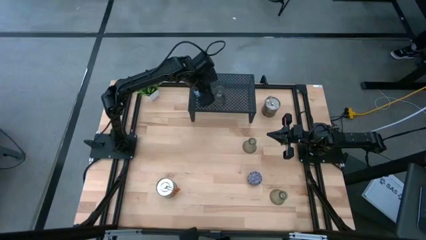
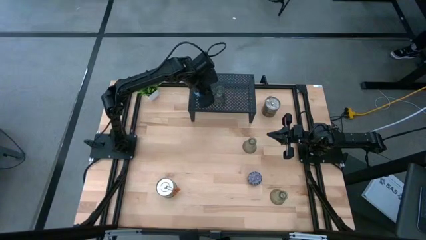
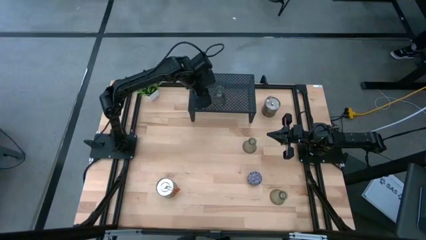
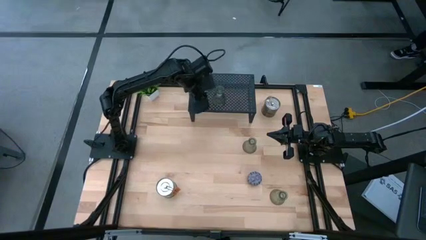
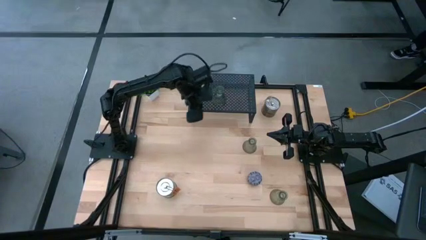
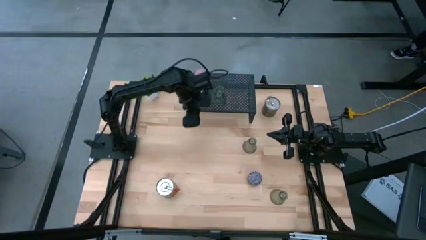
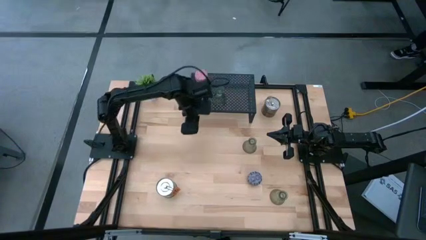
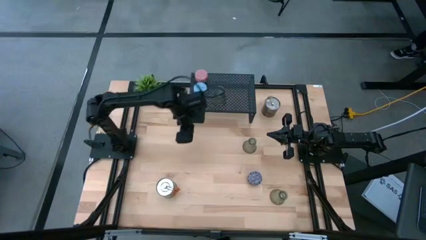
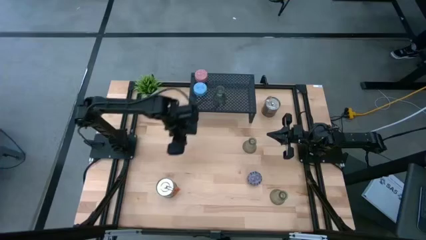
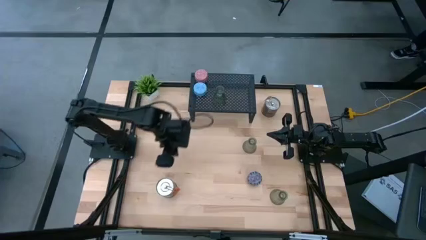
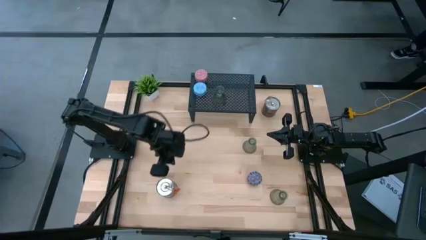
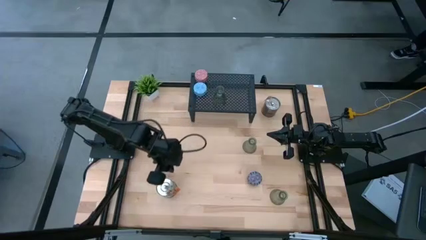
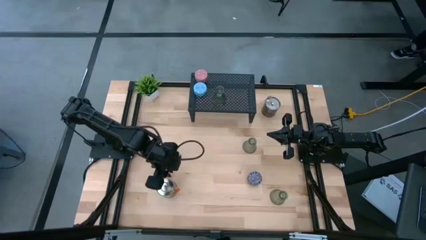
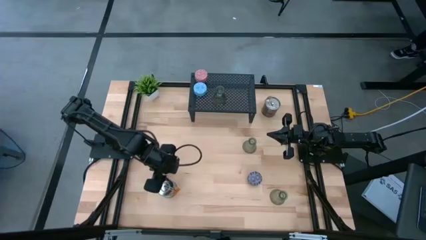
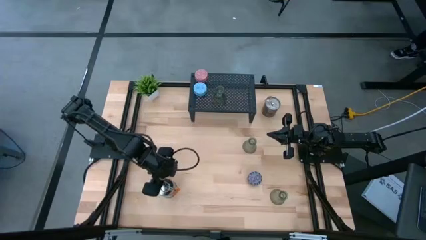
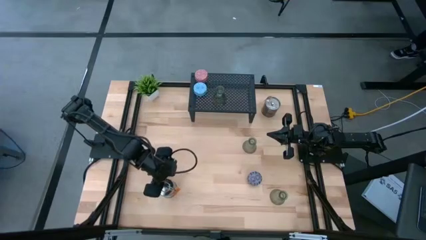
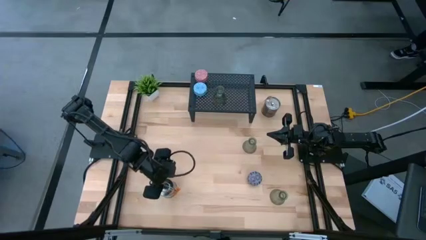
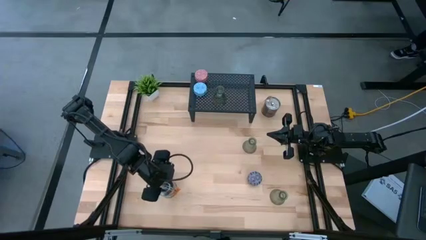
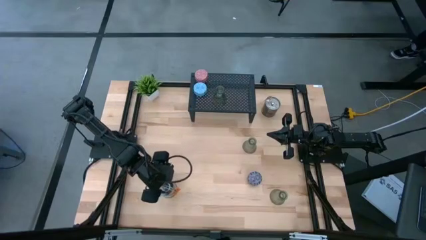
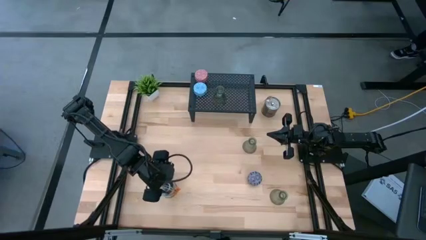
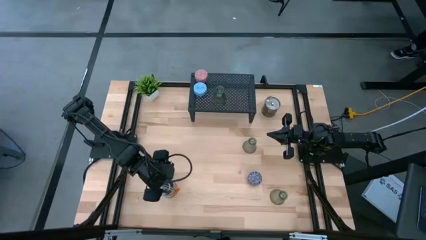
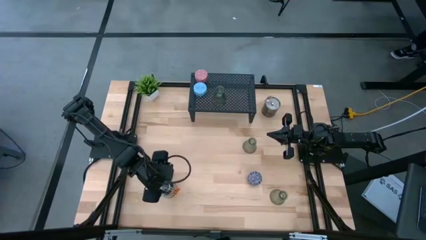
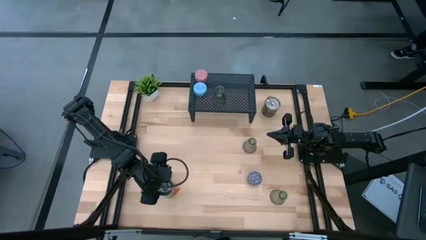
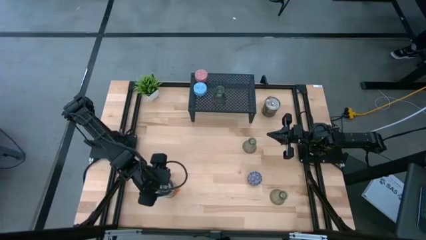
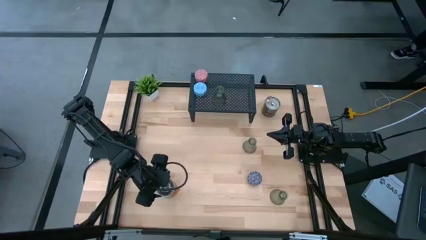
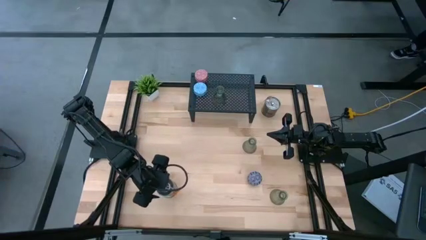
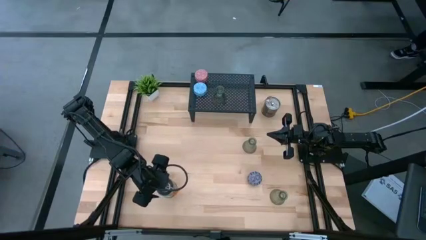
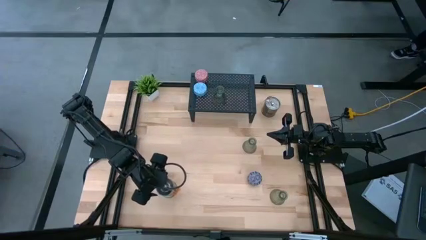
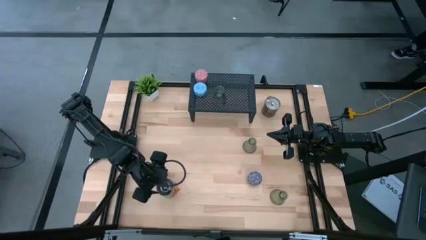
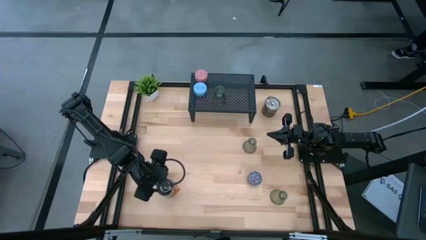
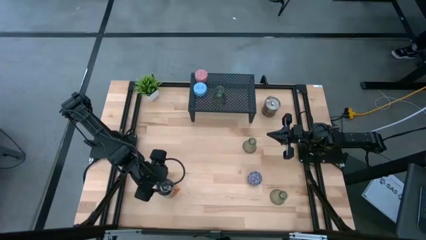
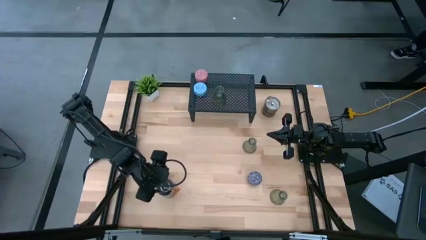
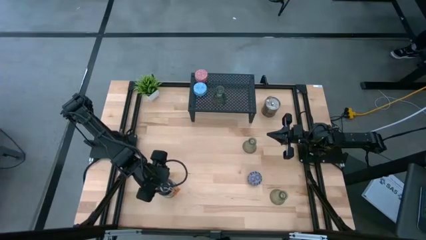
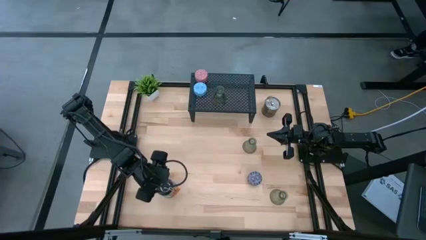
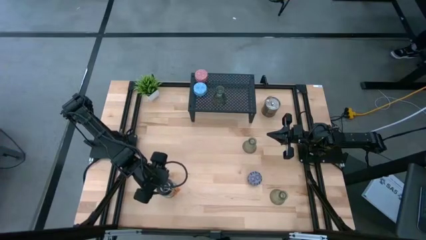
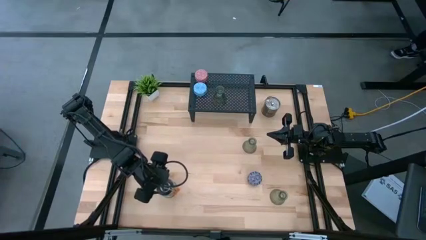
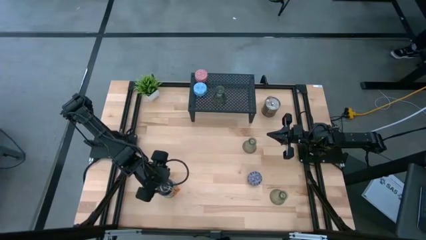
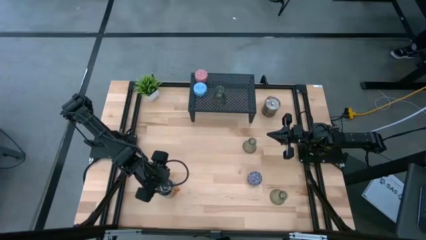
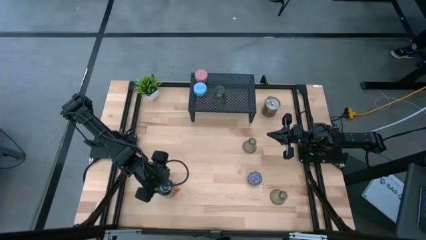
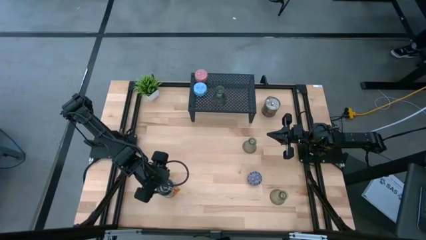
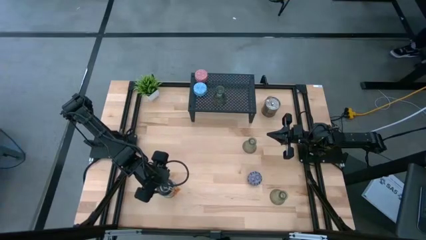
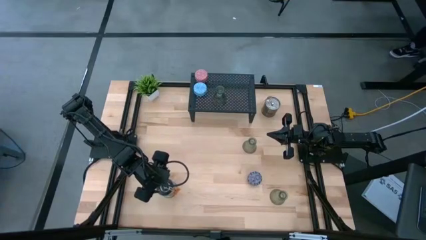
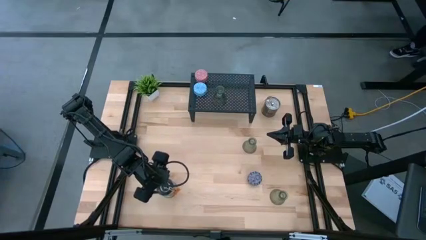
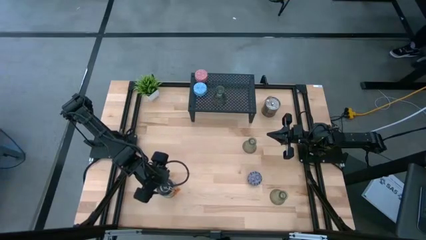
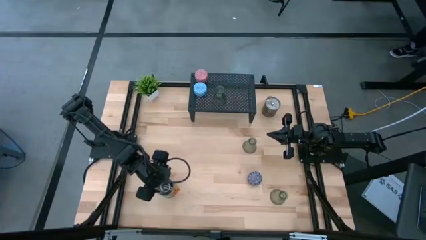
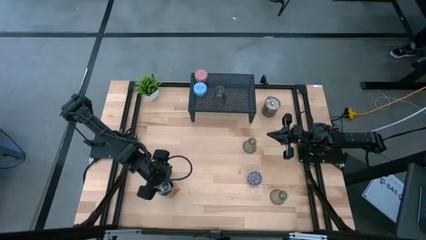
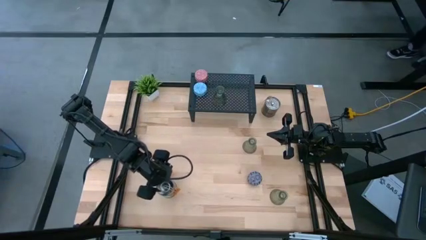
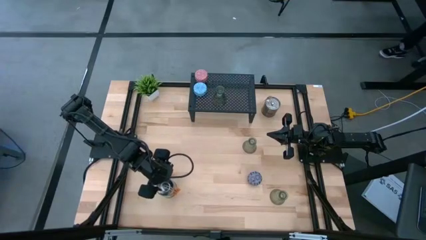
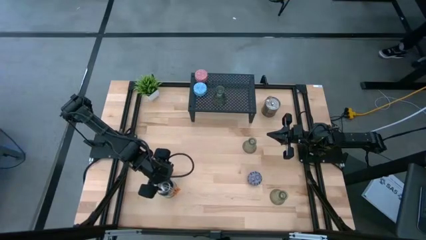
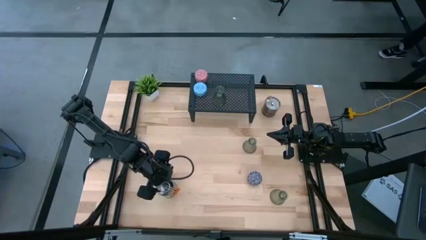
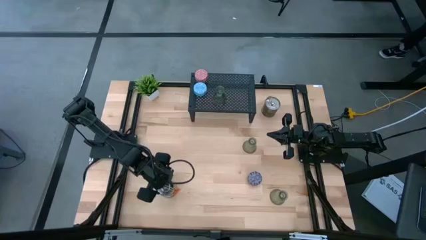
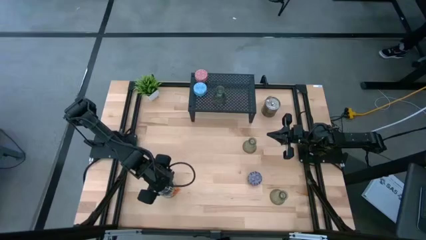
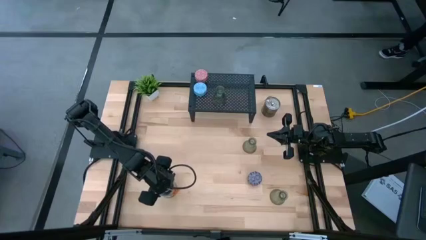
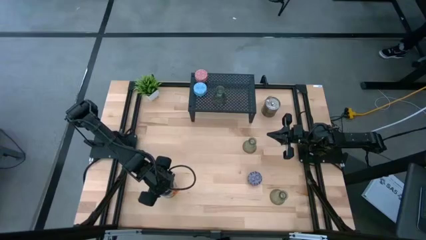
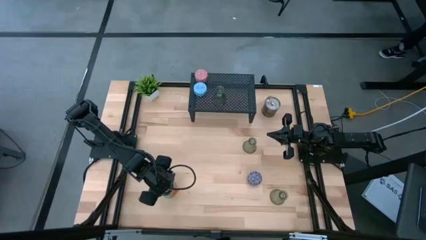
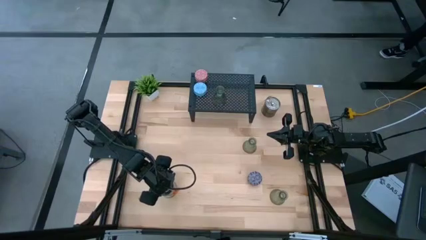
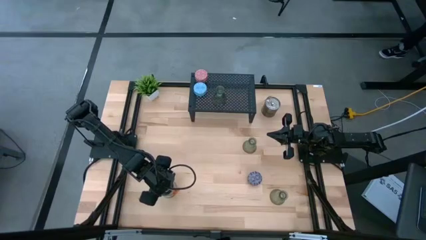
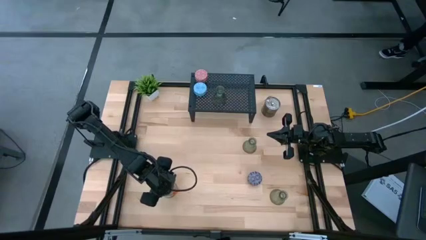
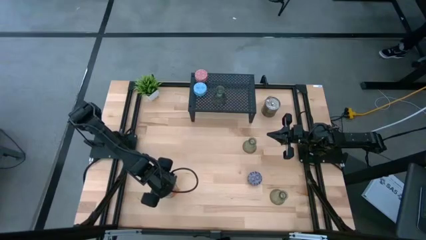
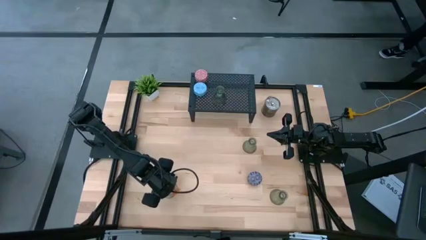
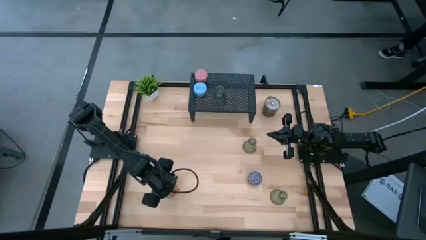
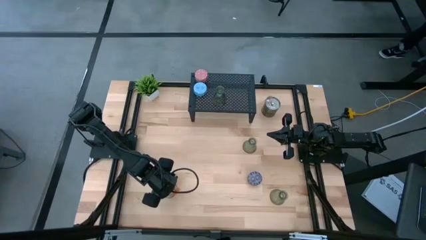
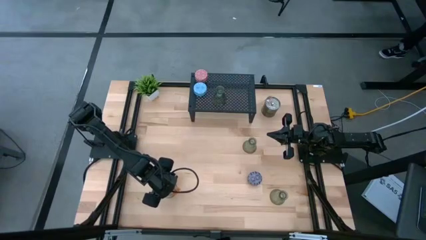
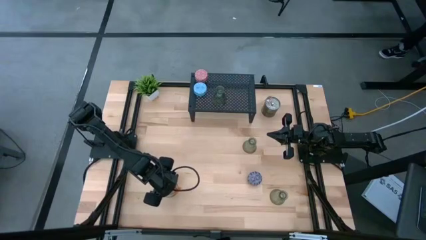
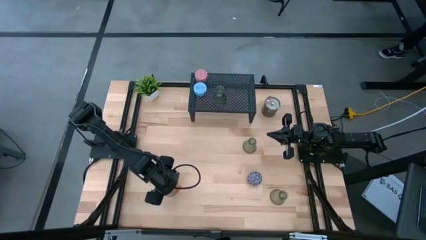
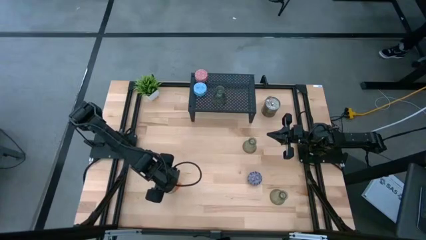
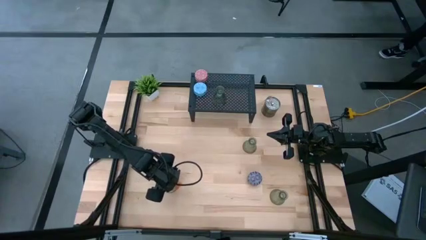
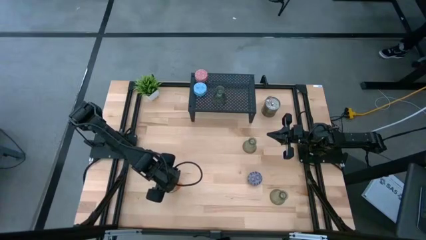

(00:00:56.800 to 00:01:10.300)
Task: Pick & Place candle stick holders
Put the bottom silver scented candle on the shelf
